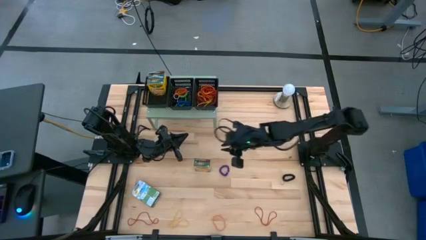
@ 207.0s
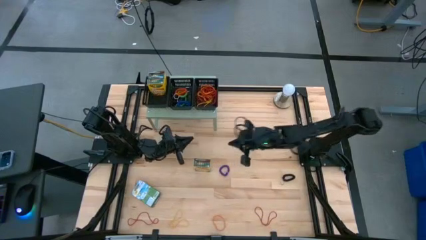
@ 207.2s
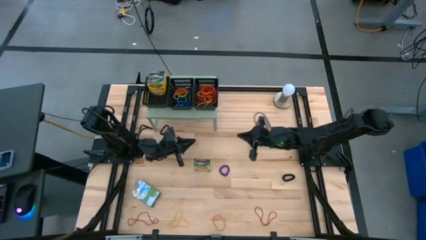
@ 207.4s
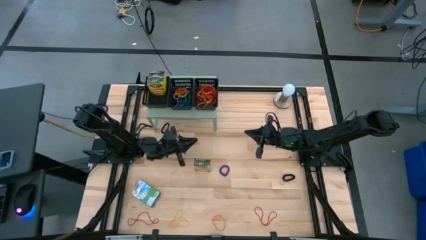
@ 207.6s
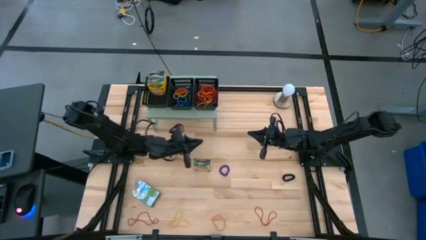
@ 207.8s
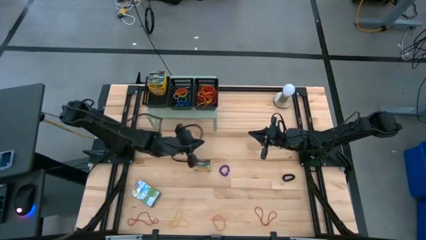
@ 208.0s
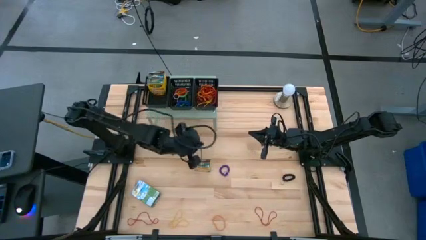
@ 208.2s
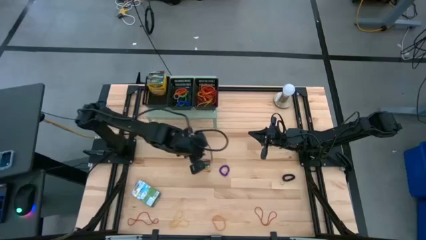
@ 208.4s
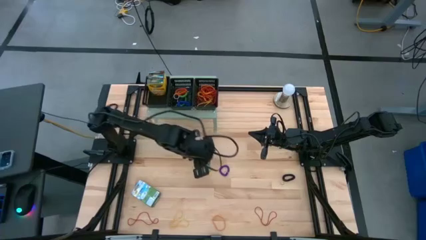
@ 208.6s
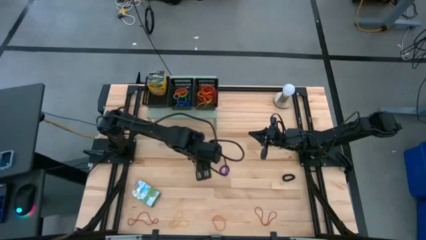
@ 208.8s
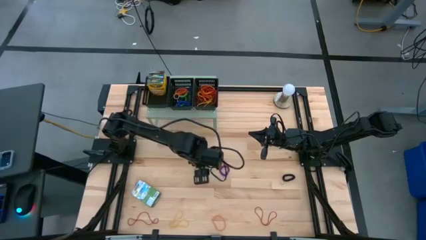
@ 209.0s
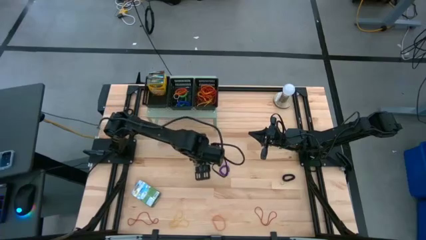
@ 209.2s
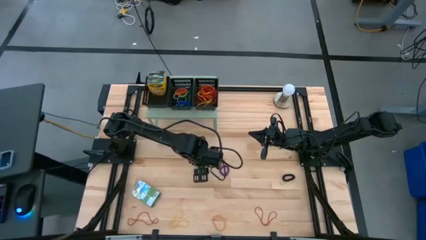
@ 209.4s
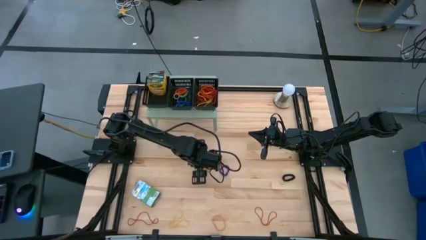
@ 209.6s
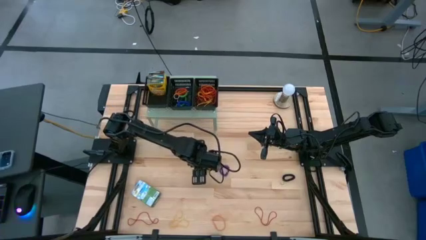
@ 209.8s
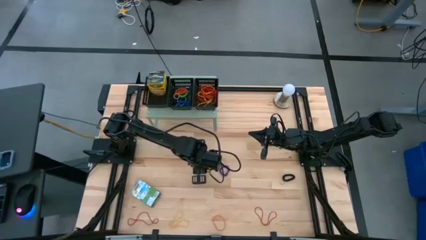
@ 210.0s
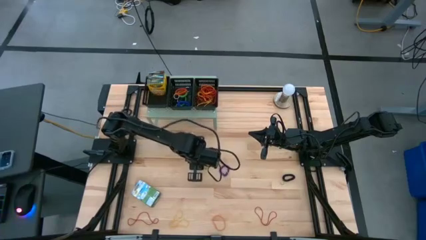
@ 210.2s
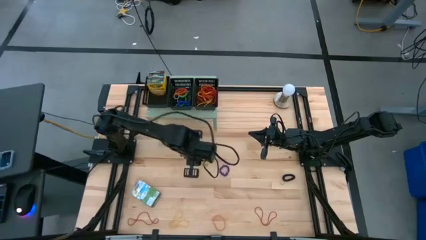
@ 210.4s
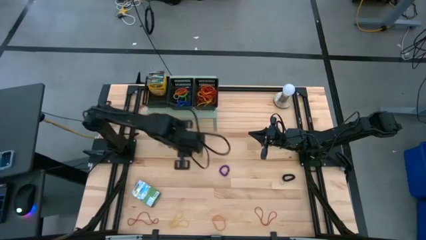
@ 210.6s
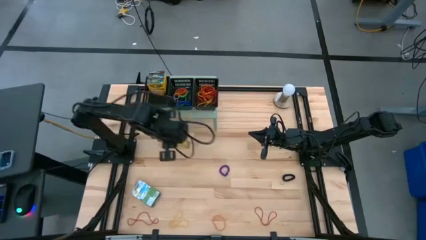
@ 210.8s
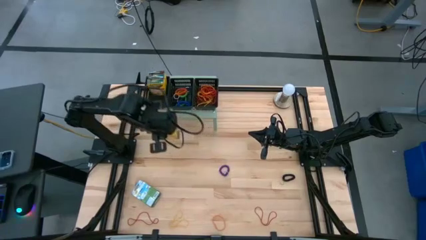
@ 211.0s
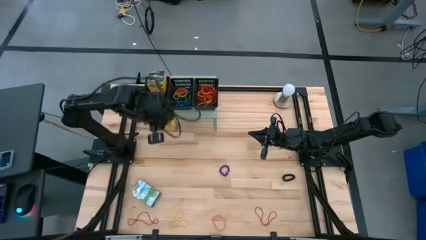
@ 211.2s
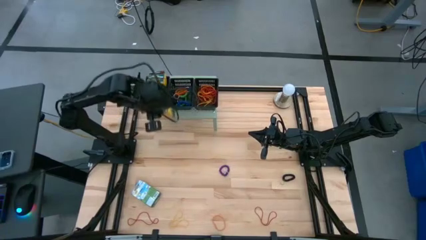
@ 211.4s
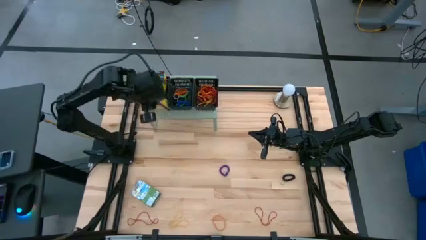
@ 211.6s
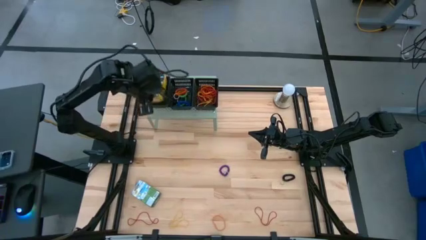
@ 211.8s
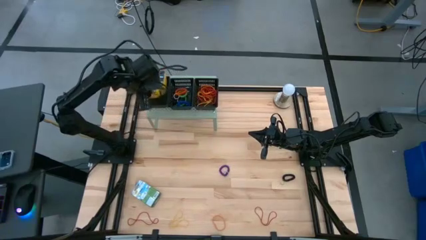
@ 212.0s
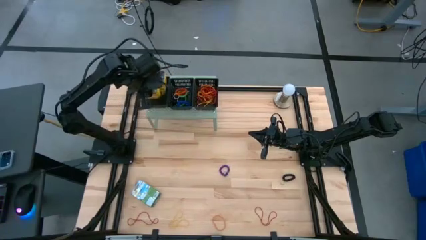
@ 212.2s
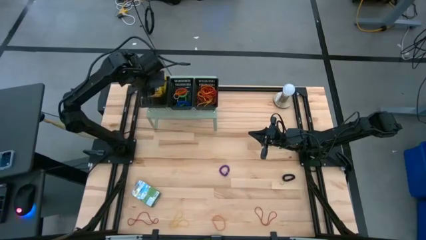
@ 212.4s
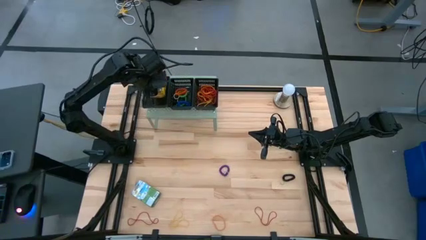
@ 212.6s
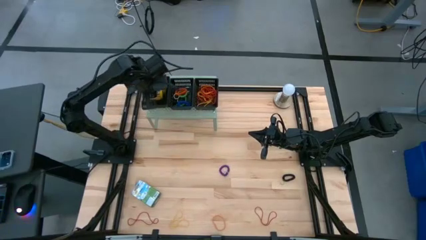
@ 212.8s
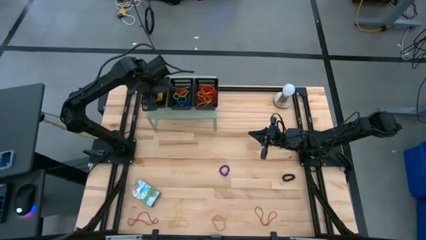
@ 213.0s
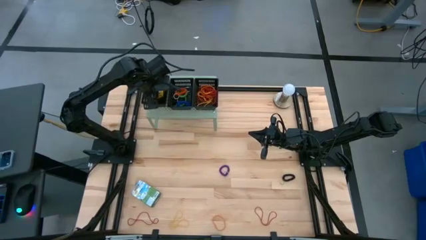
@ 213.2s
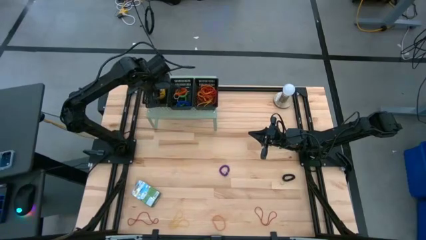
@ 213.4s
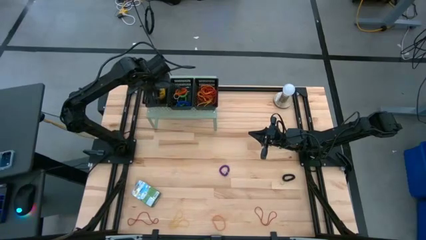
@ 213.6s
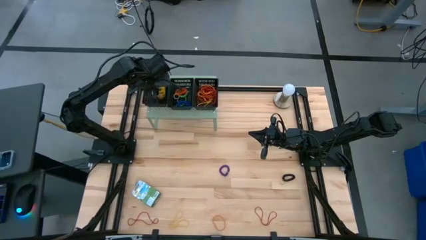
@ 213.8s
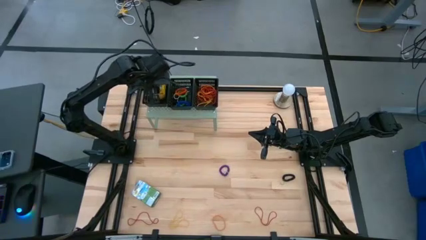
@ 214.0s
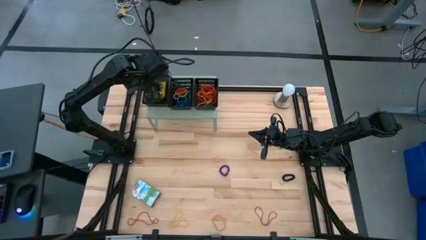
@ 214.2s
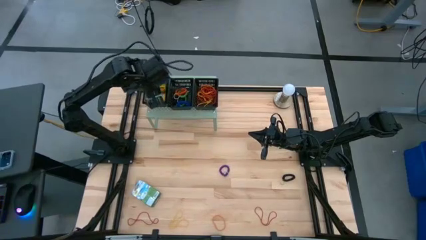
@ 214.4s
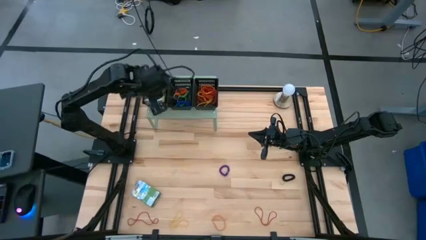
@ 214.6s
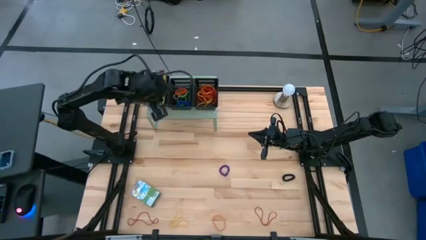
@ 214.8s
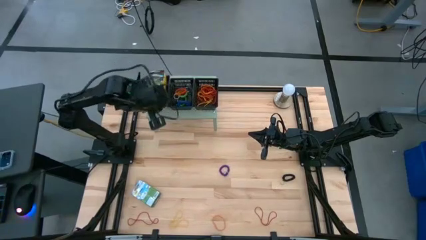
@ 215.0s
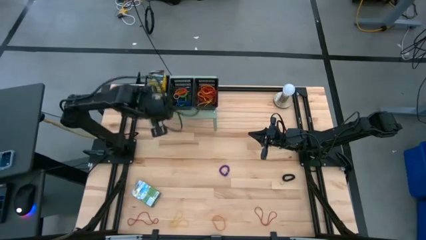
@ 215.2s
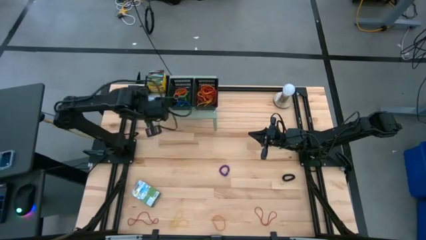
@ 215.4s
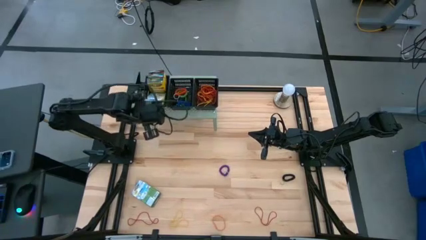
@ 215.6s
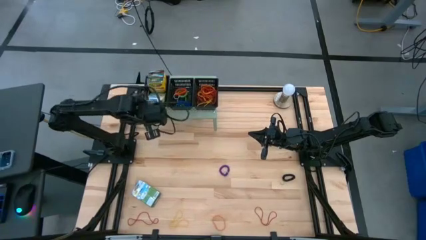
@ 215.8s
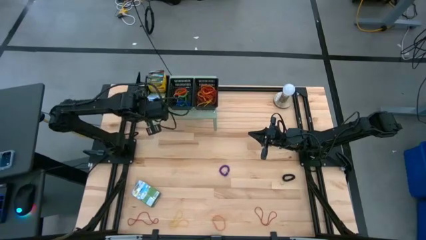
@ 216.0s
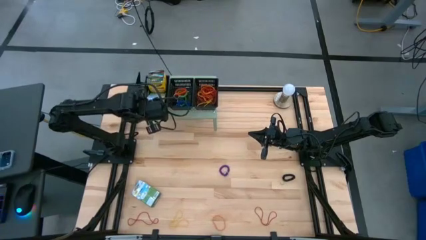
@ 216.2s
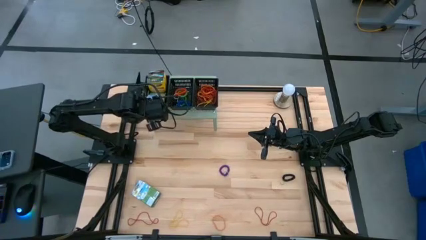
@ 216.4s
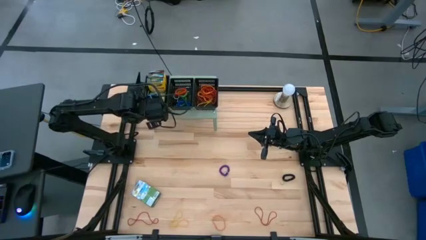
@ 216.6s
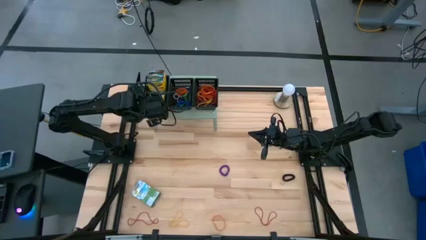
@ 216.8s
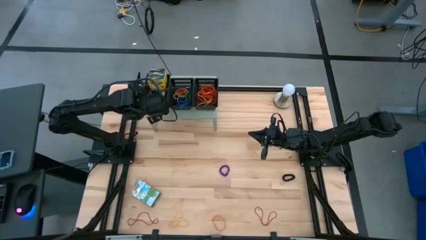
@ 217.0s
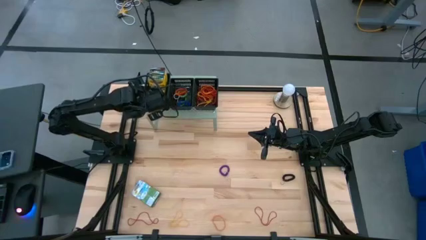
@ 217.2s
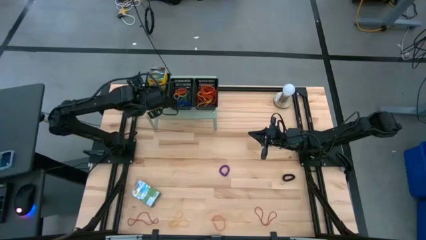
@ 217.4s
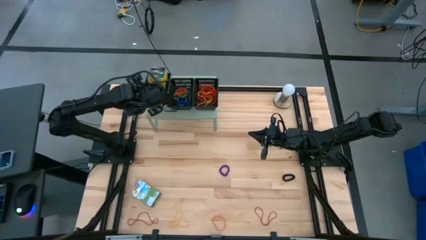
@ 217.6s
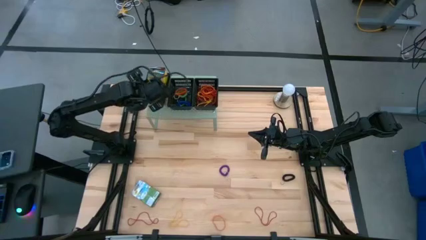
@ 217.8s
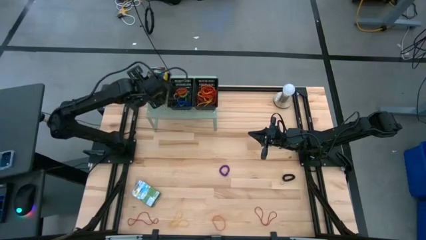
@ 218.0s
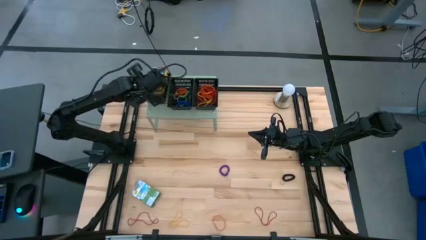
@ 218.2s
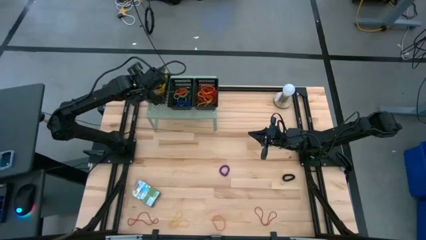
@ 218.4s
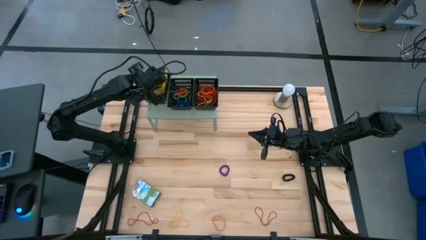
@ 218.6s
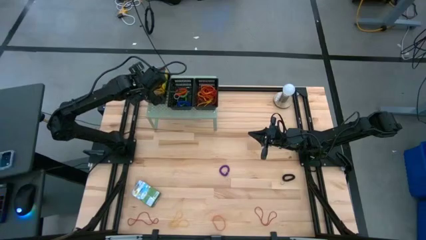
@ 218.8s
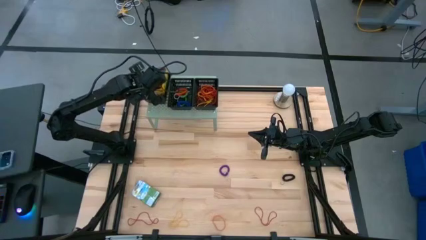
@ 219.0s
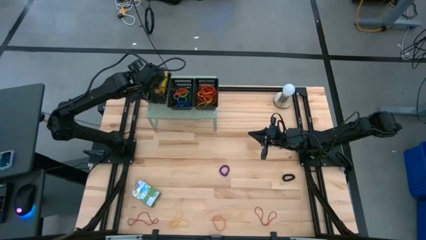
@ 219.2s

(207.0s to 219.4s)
Task: Pick & Place Office Desk Supplies
Put the crayon box into the left black bin on the shelf

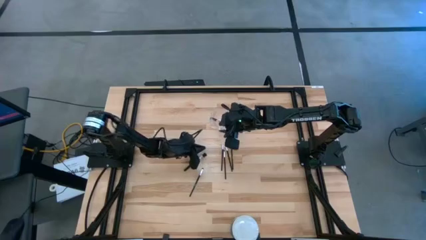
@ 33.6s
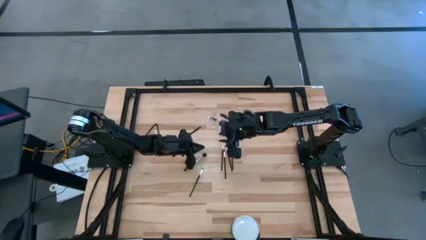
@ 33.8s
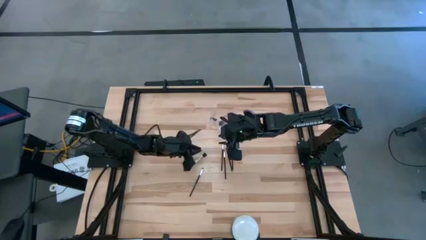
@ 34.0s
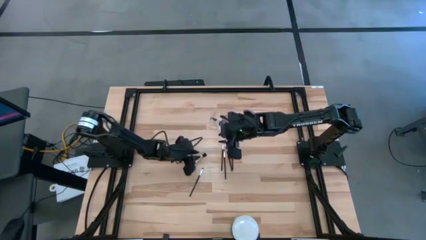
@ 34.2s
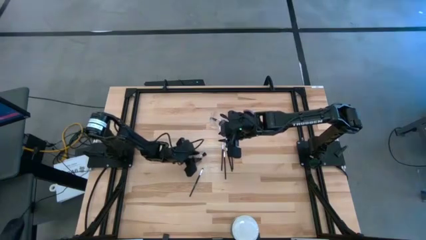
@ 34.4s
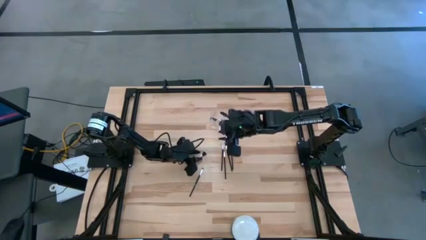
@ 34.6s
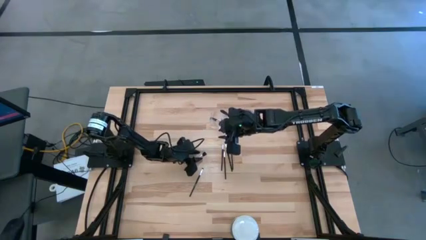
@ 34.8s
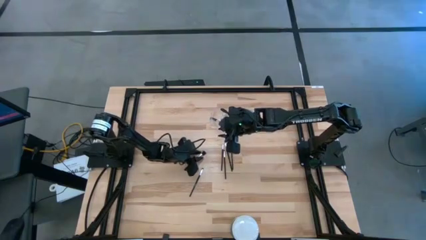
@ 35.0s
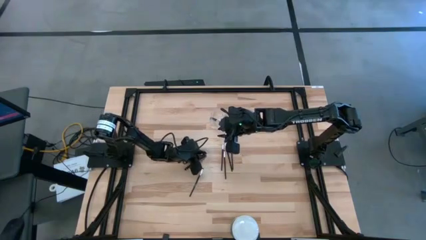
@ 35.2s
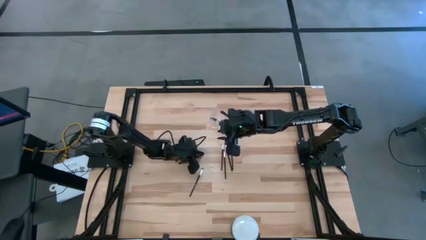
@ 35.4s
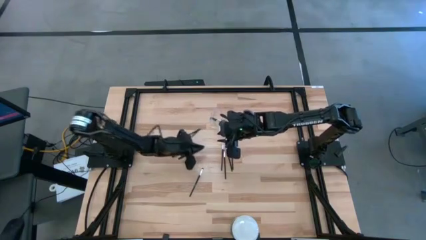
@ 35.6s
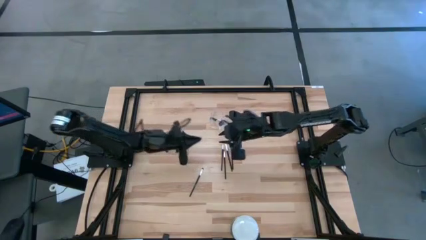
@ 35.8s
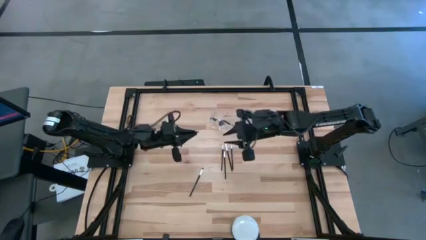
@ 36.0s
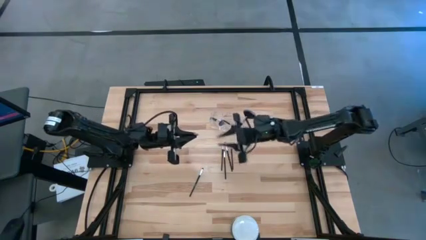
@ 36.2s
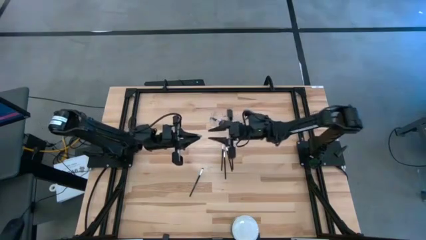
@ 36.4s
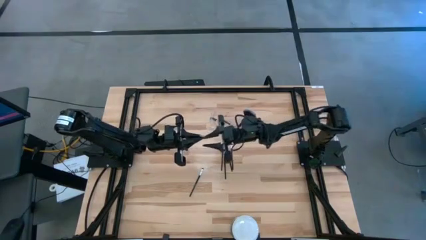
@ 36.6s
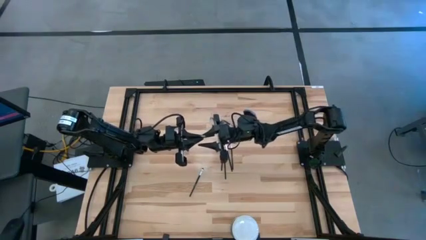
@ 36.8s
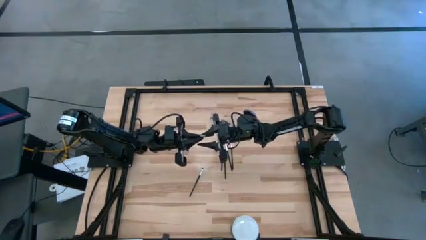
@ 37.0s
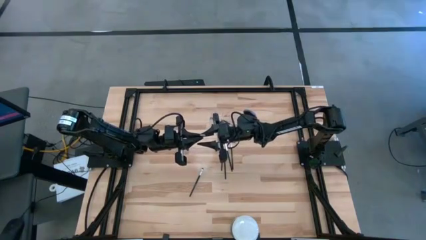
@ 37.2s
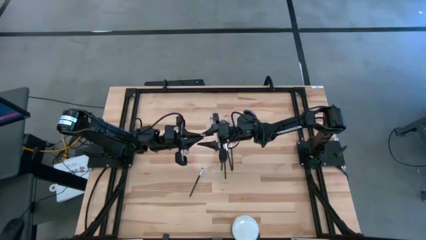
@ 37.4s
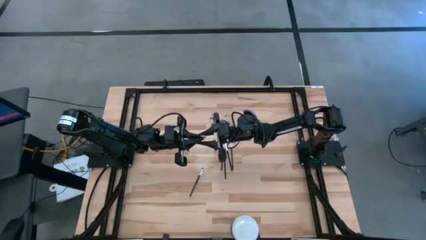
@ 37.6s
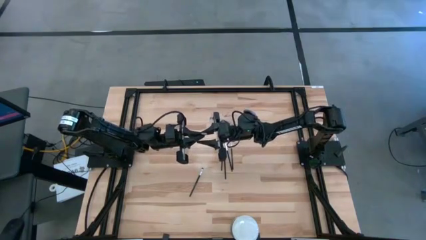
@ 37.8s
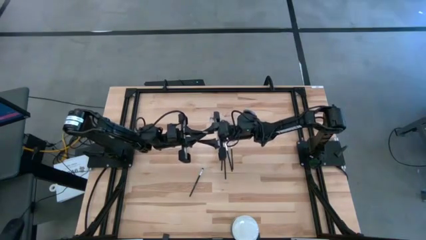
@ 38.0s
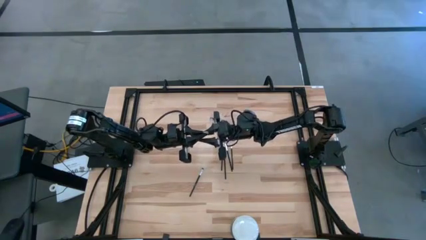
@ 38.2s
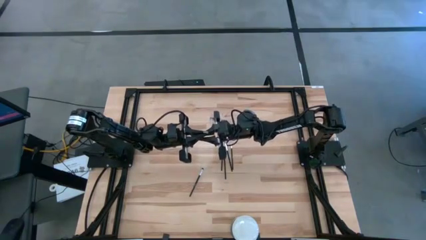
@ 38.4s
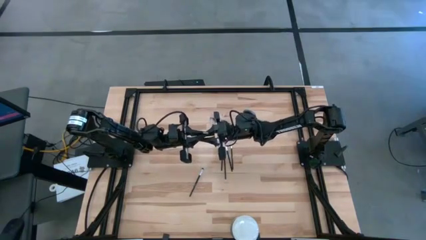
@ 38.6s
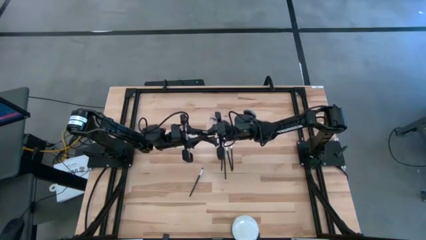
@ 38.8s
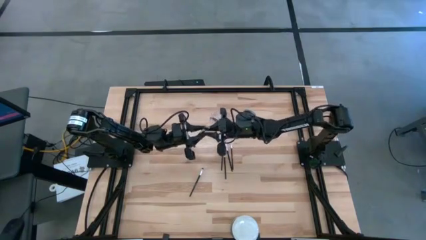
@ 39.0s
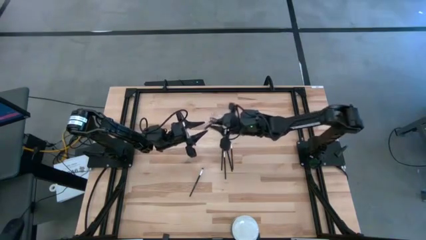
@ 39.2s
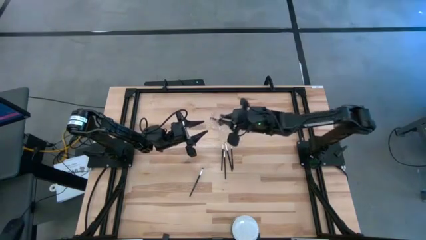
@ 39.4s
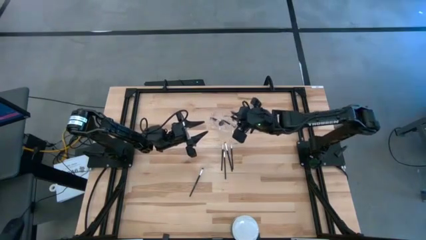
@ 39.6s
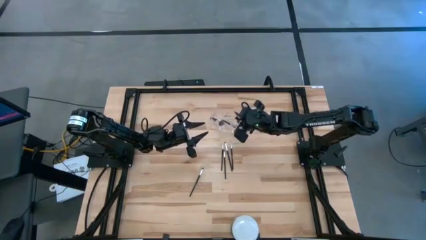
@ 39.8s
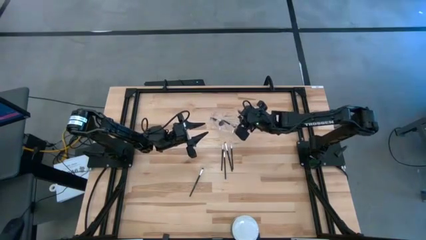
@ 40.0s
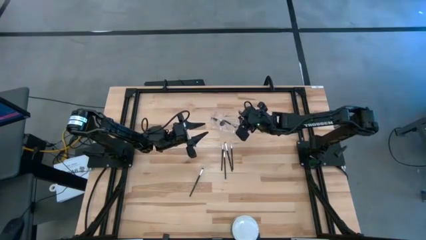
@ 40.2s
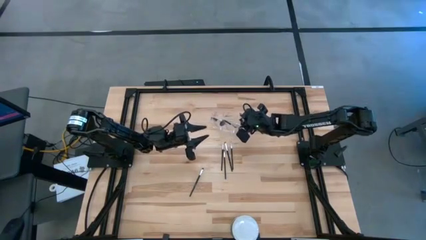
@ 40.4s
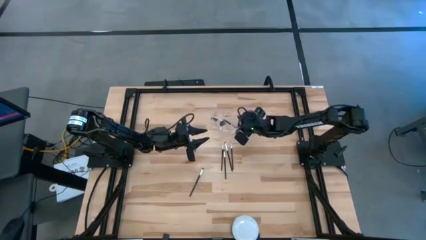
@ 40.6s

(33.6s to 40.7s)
Task: Put items in baskets/containers
Put the black blush brush into the transparent organizer
